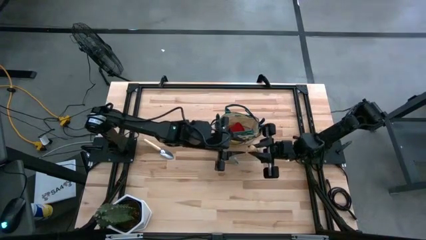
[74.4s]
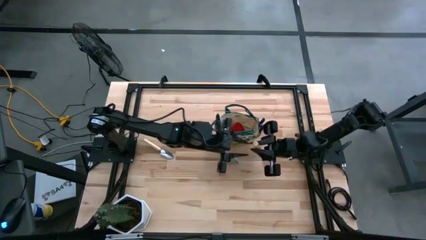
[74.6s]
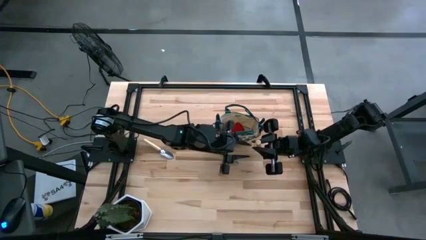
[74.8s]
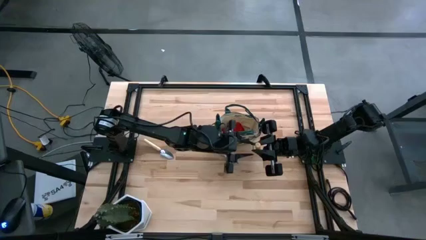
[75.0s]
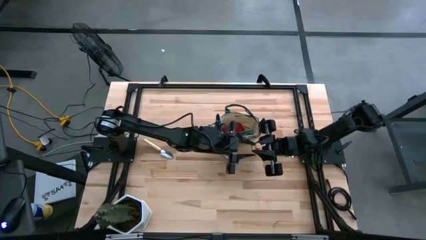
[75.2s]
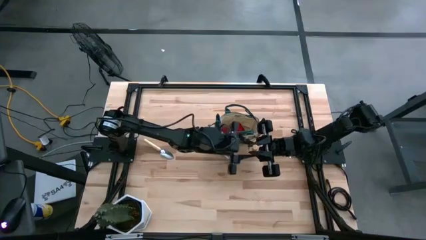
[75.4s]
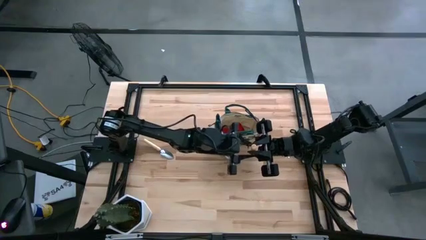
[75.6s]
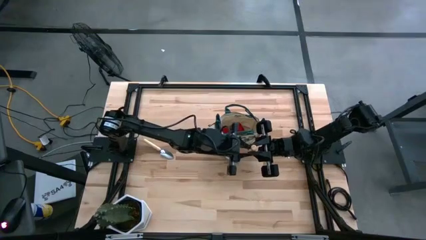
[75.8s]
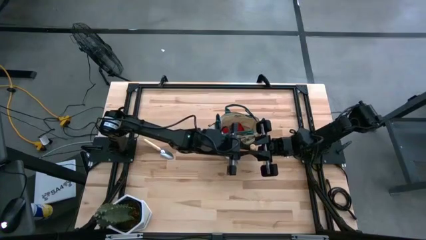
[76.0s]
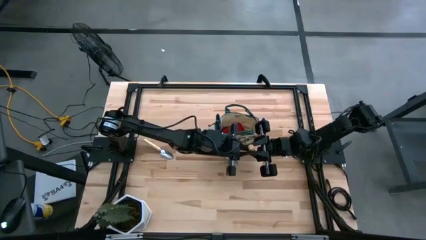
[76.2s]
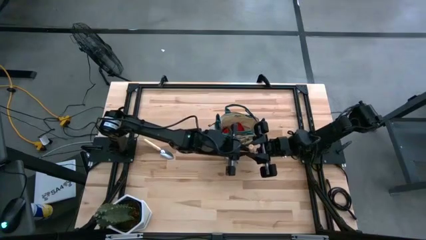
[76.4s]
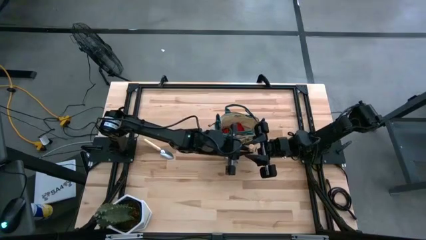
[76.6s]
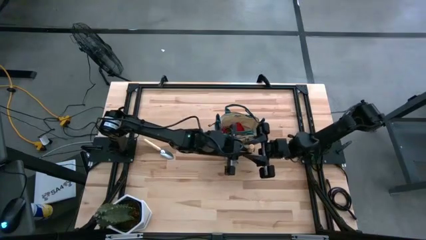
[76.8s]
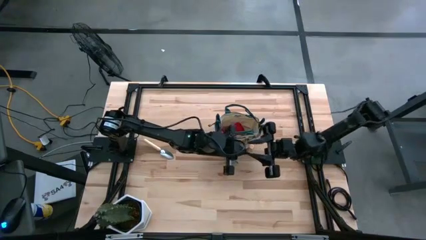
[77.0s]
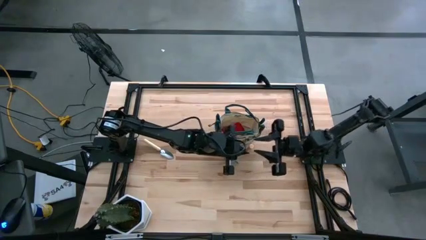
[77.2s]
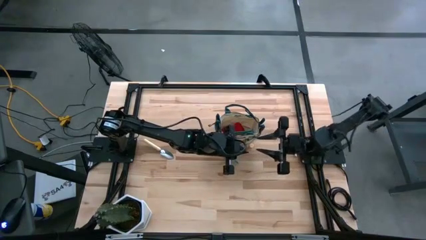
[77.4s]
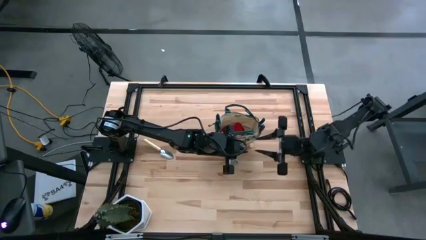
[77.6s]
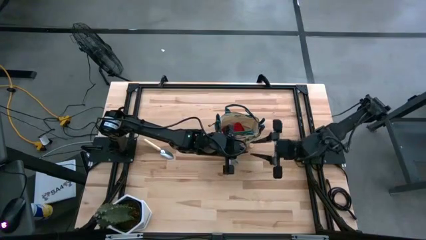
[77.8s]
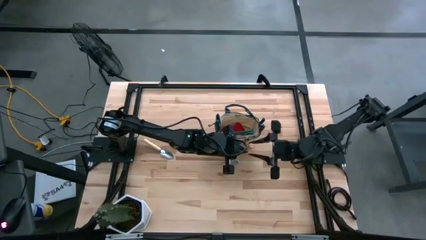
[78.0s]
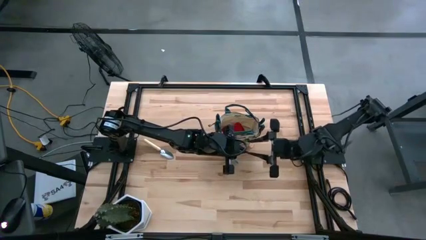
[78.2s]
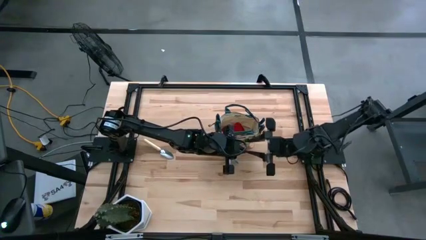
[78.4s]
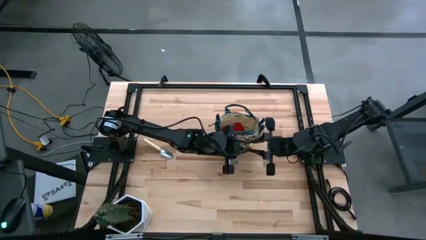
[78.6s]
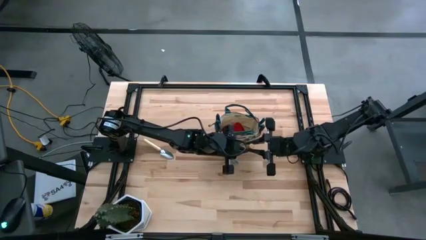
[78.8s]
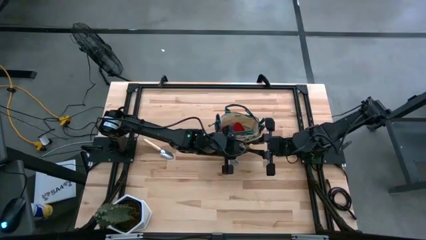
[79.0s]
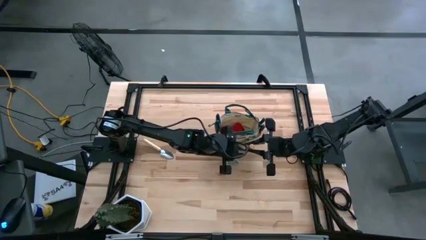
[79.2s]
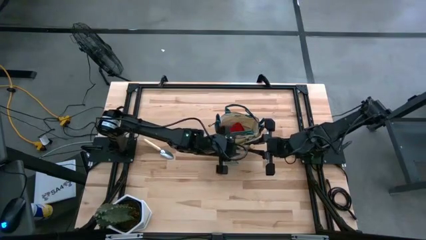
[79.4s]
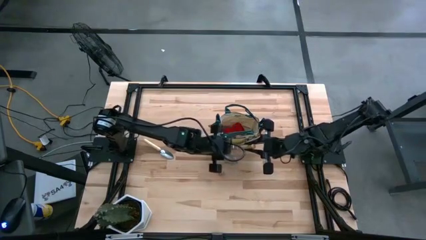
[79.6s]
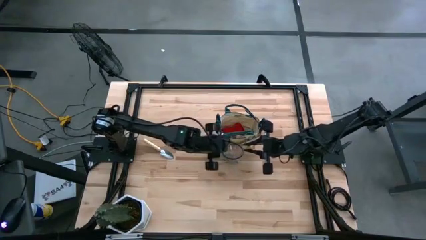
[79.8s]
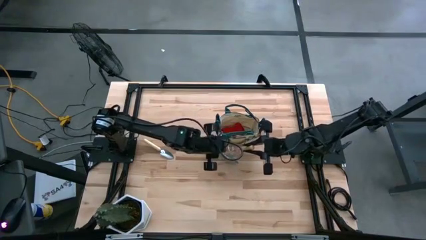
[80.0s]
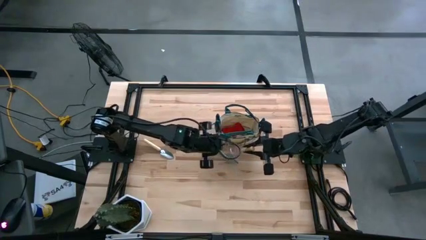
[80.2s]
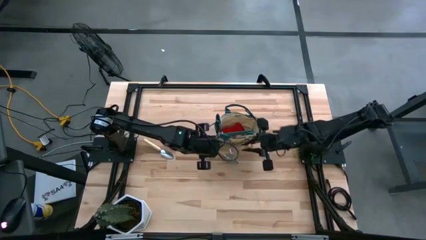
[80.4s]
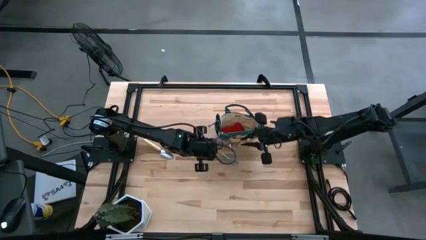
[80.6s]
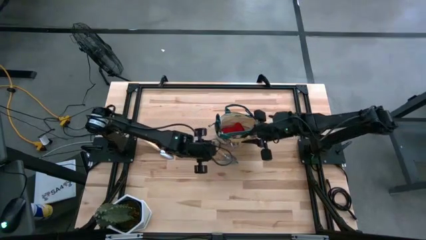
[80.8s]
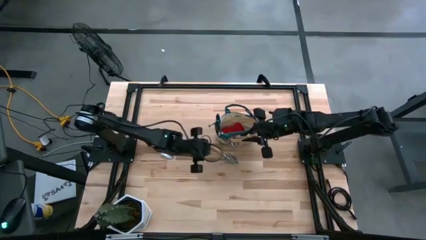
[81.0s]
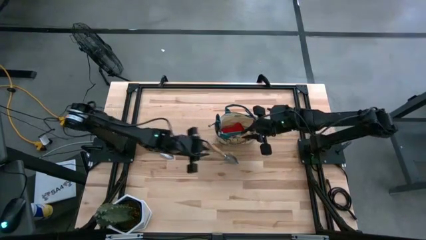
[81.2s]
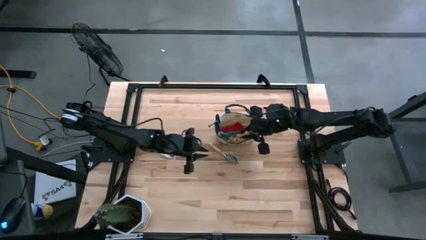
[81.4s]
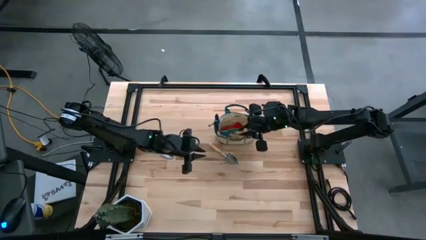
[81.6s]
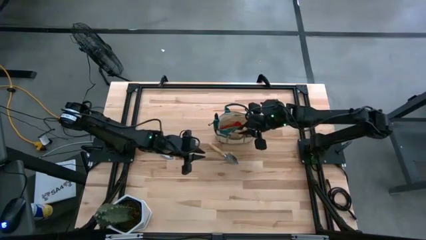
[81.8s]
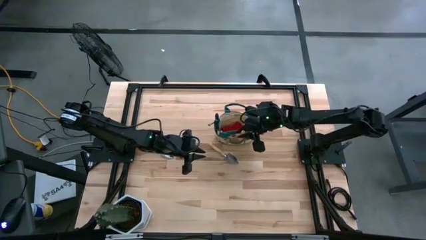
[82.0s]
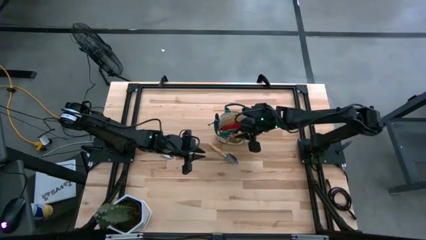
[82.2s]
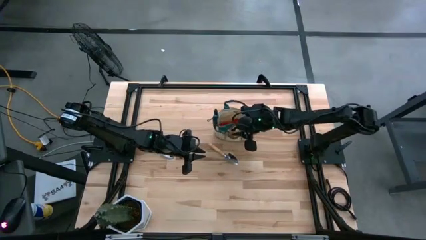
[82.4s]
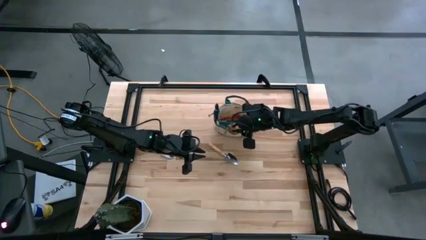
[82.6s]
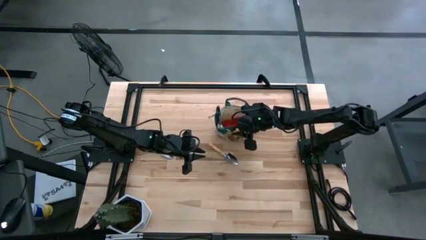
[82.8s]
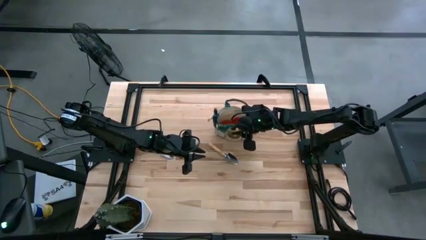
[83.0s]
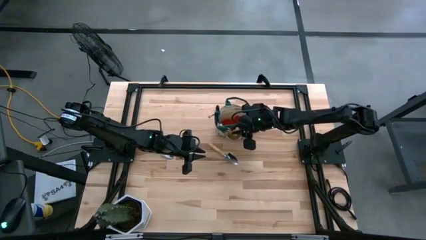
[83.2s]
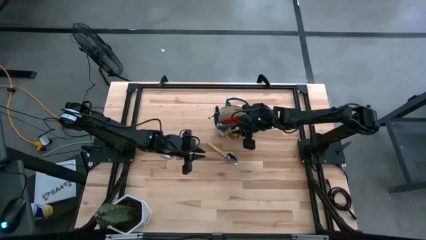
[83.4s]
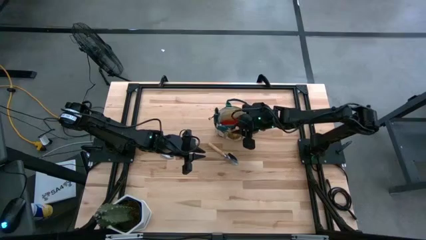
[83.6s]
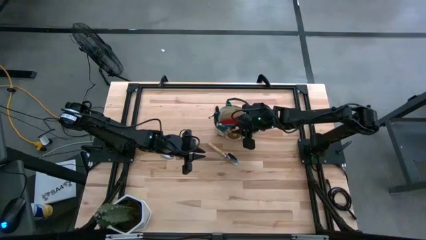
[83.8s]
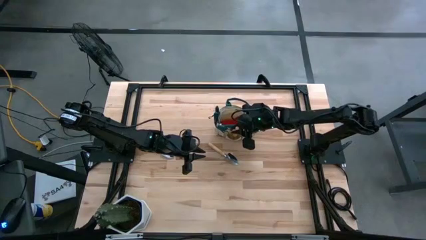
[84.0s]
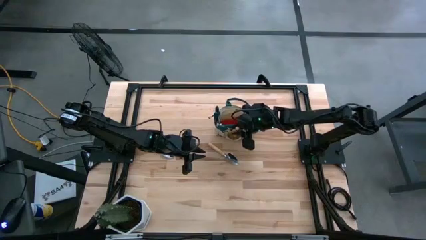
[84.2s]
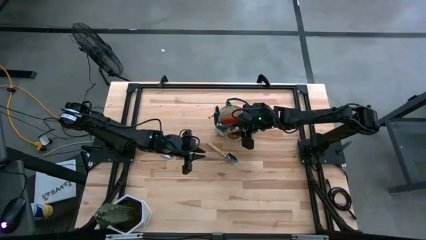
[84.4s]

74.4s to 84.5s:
Task: Pick & Place Garden tools in Gardening bag
Put the brown hand rake into the gardening bag

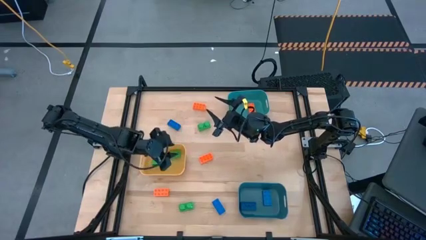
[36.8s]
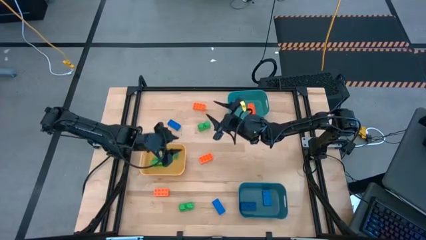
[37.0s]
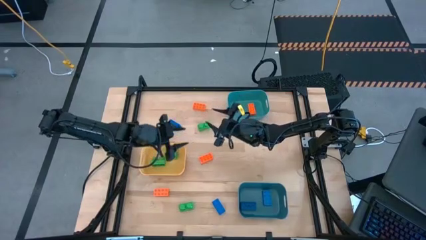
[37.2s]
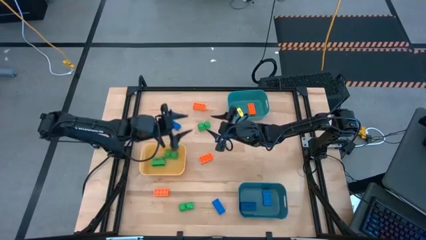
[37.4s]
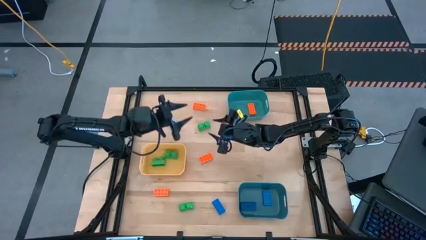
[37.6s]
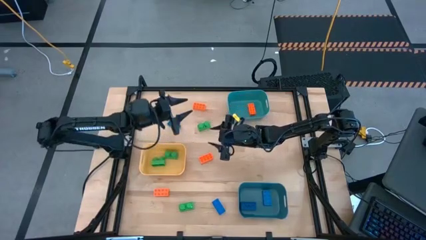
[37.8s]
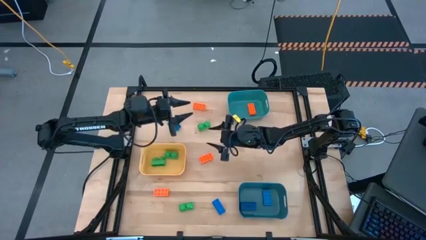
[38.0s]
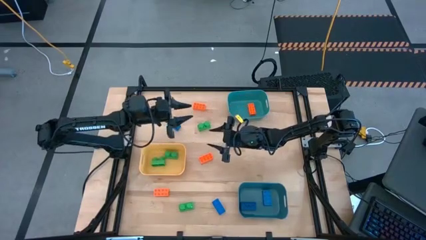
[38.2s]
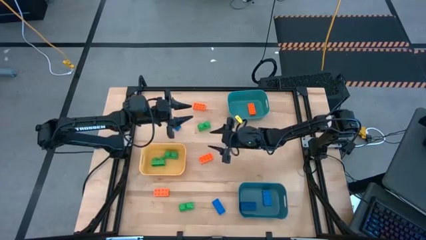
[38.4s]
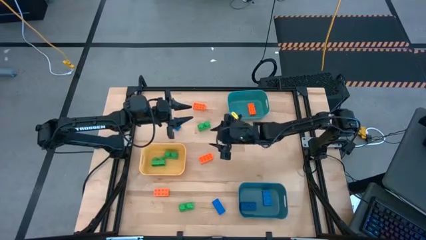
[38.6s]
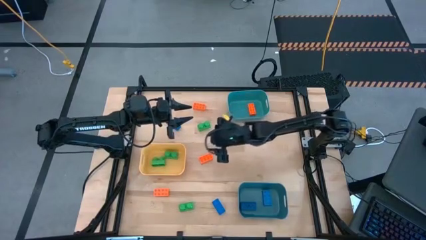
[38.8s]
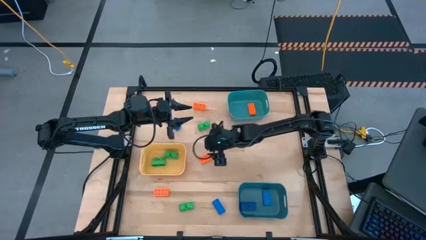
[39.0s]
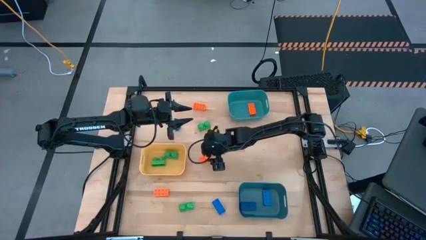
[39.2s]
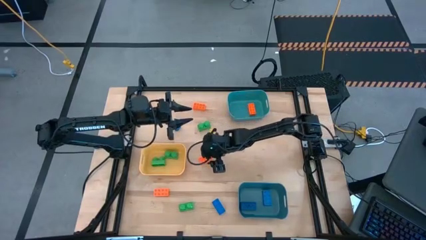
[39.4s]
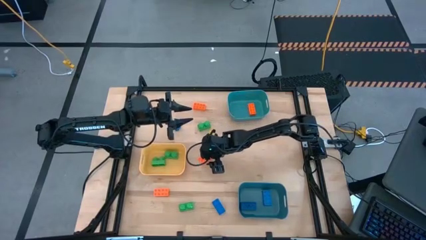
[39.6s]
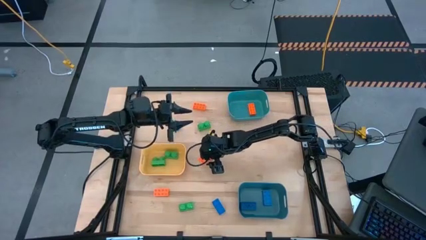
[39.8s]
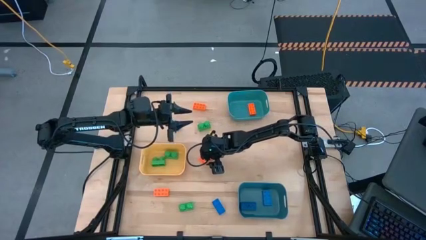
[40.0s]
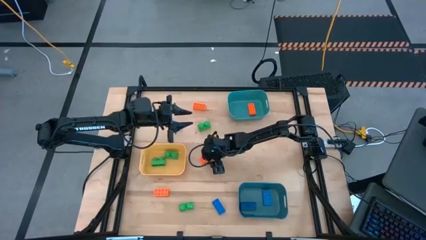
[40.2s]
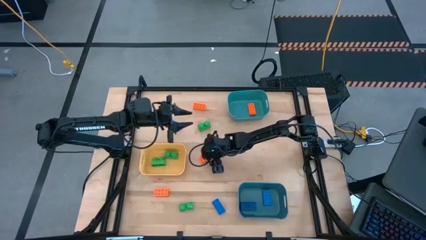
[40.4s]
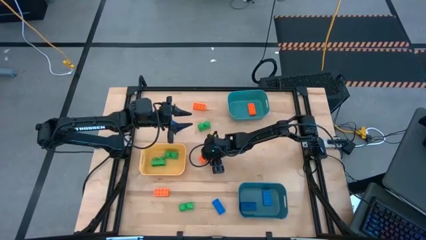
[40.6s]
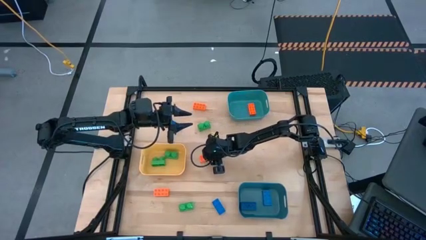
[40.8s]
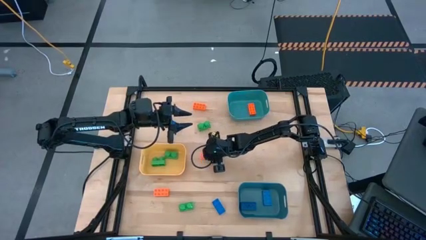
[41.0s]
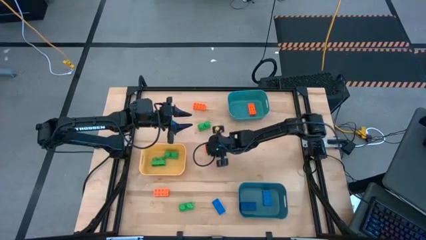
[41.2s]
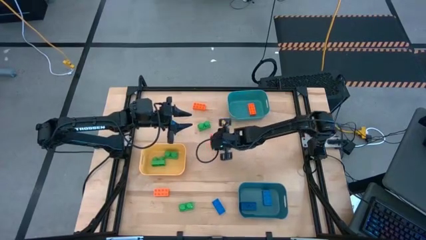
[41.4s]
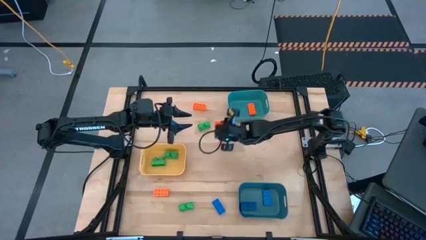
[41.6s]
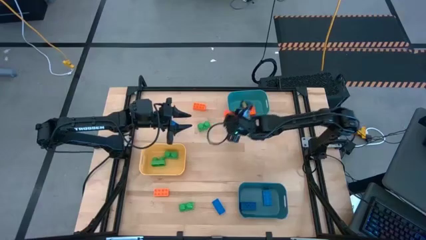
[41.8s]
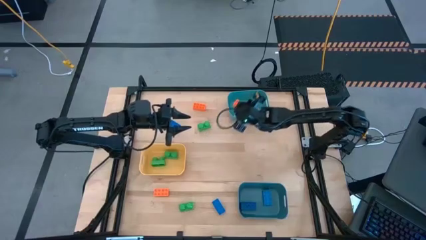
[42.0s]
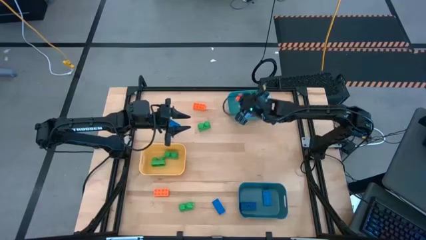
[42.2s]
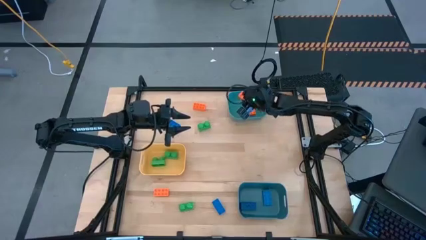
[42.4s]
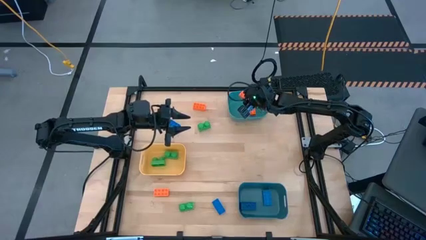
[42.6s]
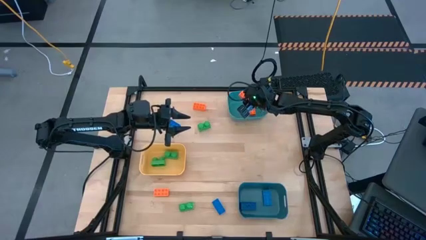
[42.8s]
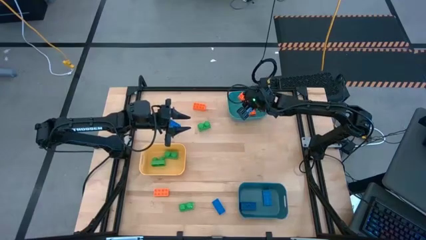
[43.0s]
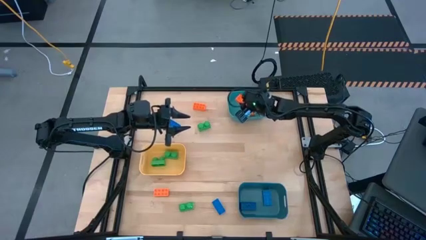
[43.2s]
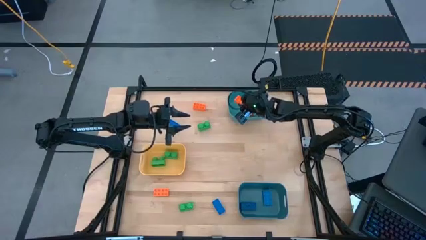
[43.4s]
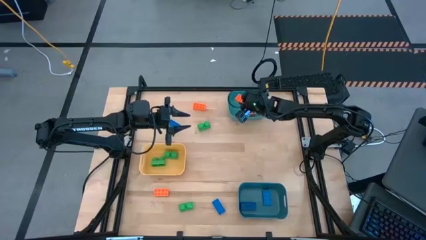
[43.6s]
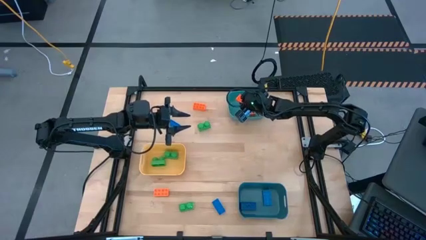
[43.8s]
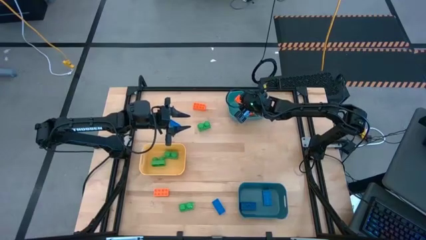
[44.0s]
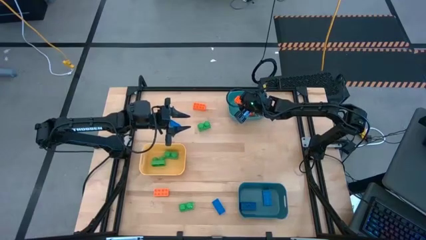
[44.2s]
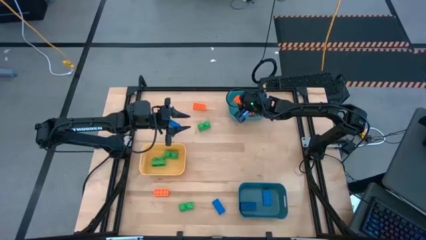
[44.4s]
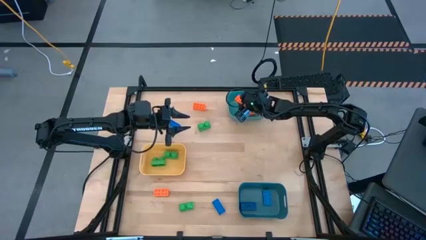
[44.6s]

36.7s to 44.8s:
Task: Sort & place blocks by color
Put the orange game piece into the green bin
